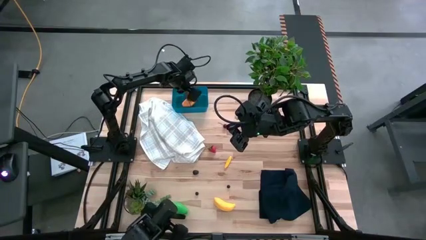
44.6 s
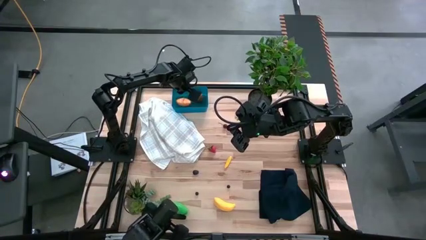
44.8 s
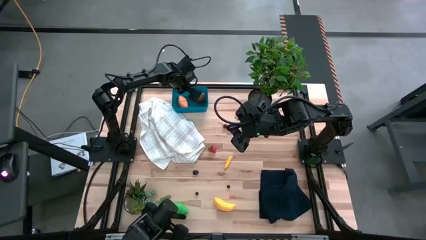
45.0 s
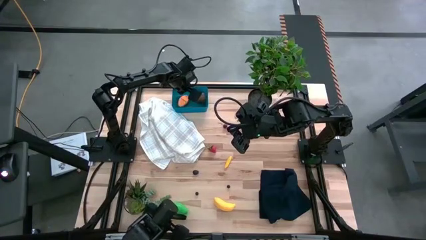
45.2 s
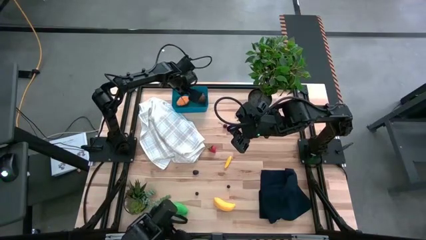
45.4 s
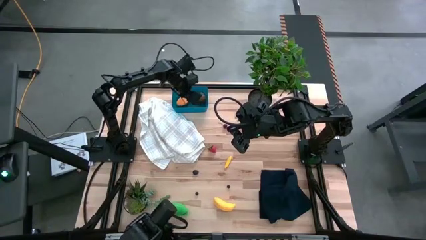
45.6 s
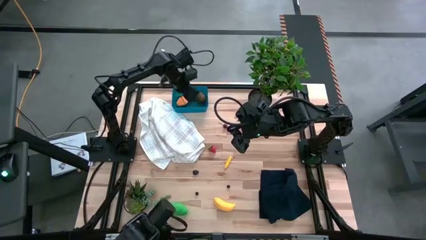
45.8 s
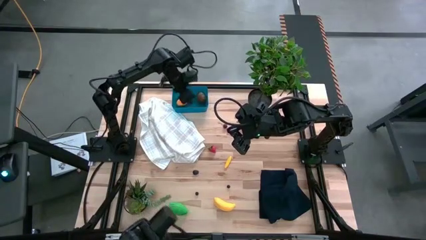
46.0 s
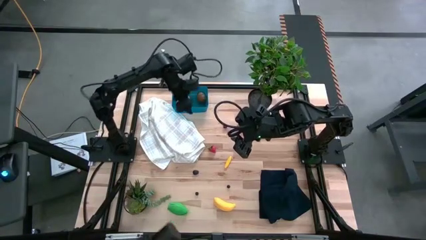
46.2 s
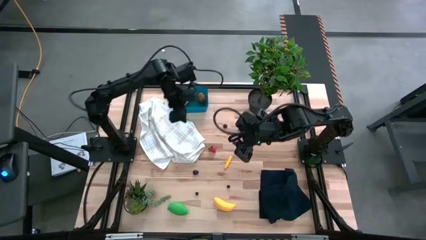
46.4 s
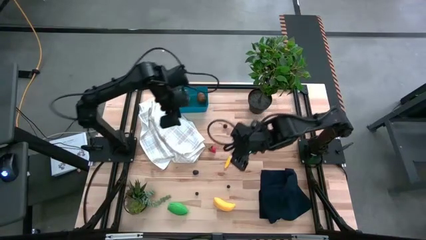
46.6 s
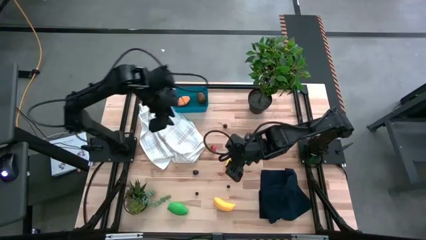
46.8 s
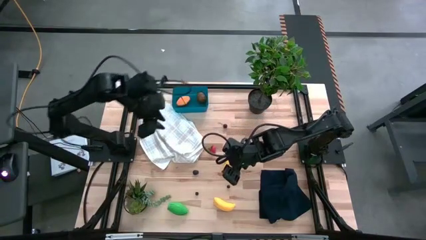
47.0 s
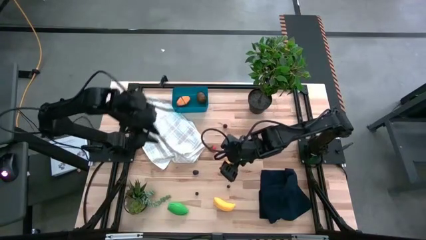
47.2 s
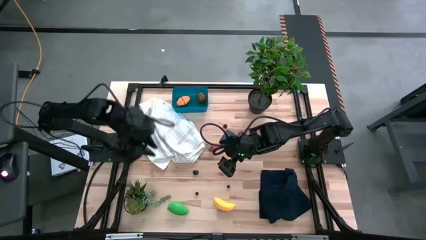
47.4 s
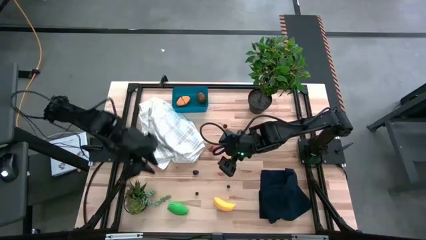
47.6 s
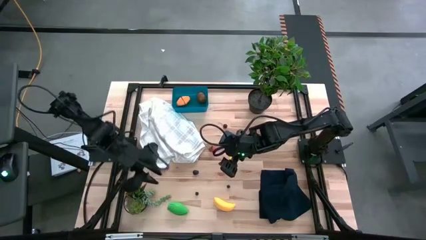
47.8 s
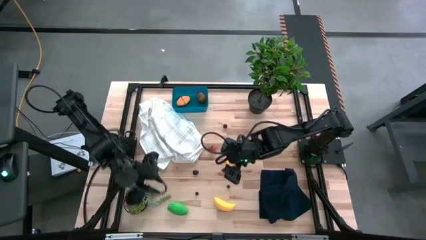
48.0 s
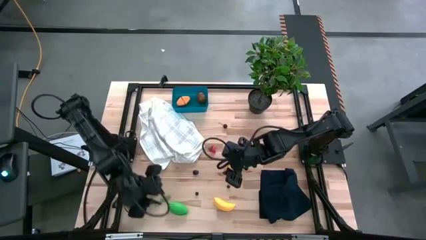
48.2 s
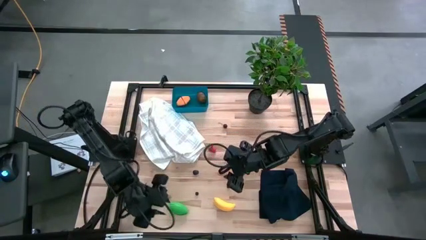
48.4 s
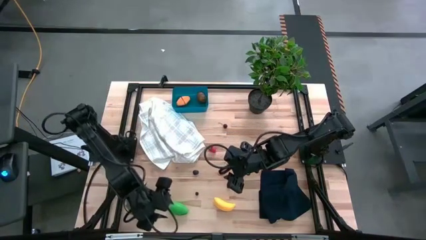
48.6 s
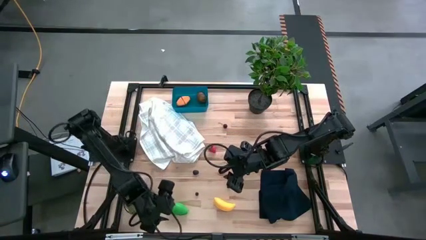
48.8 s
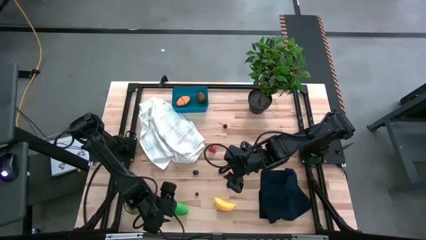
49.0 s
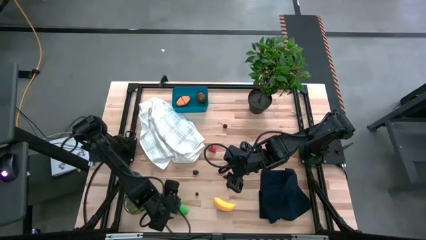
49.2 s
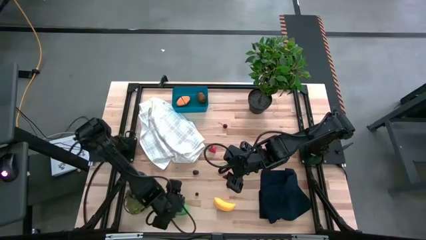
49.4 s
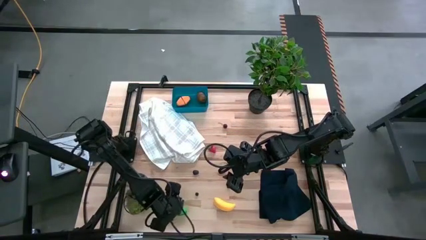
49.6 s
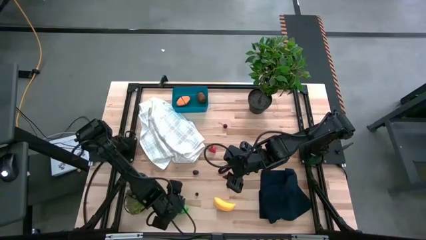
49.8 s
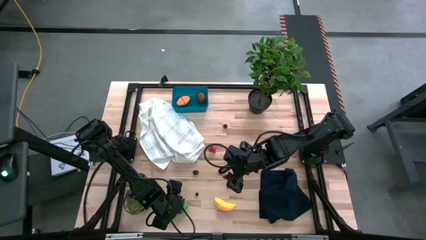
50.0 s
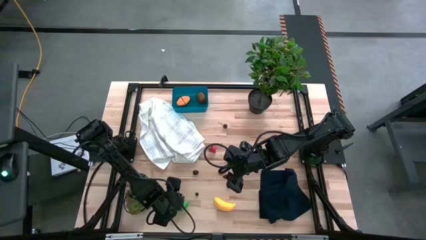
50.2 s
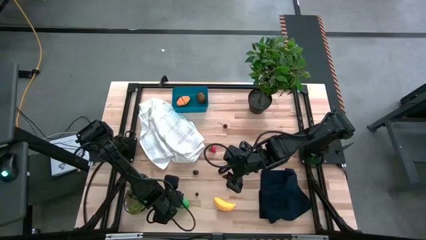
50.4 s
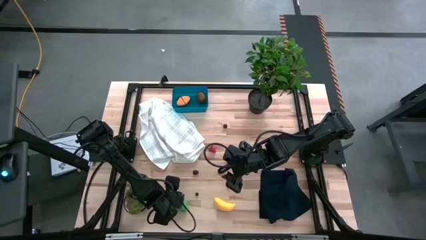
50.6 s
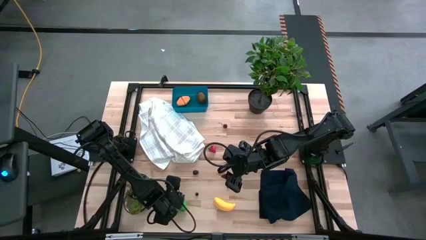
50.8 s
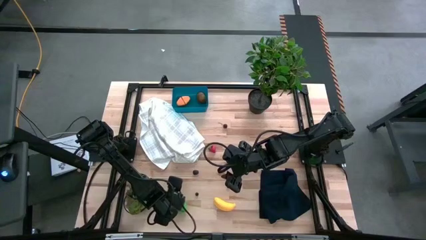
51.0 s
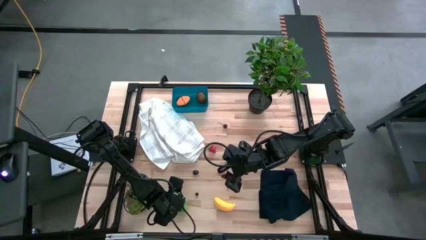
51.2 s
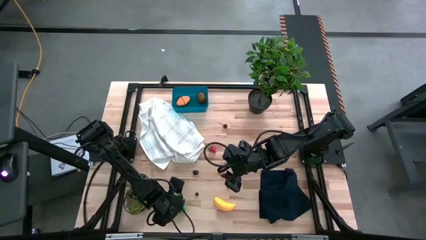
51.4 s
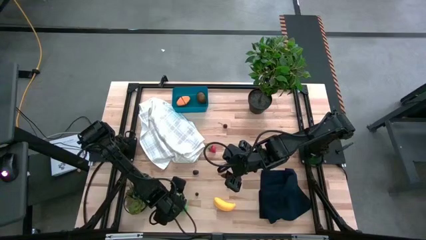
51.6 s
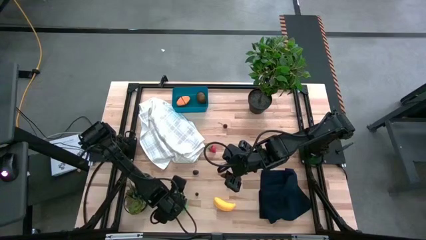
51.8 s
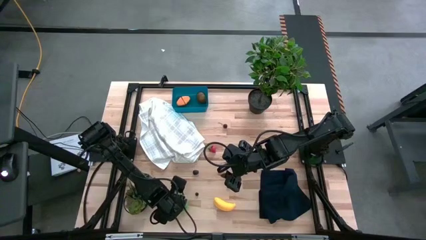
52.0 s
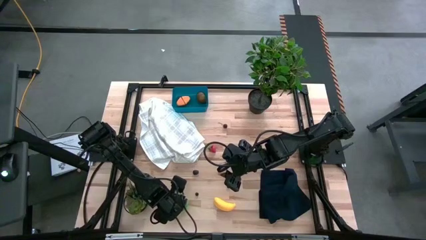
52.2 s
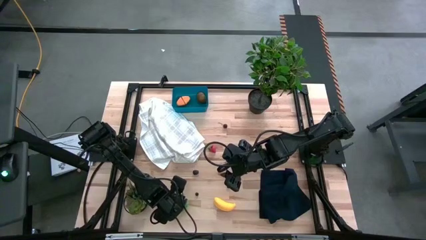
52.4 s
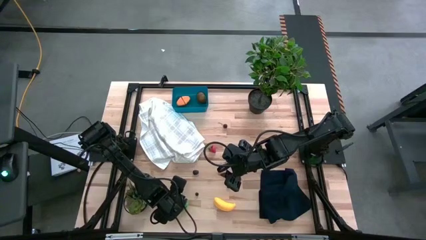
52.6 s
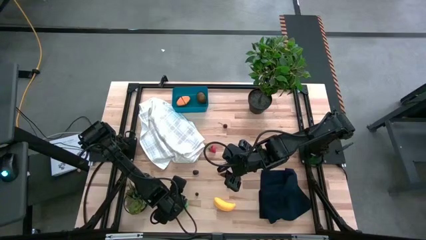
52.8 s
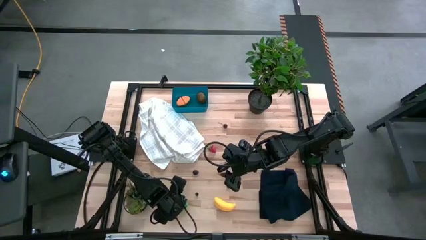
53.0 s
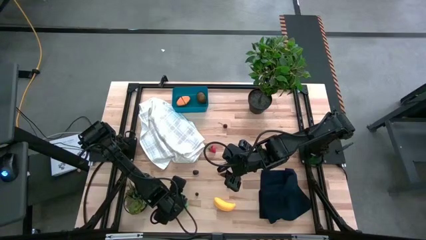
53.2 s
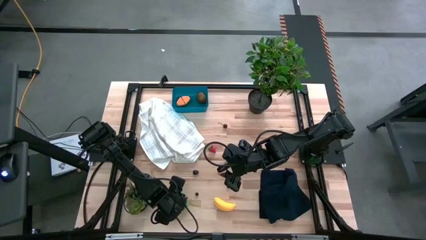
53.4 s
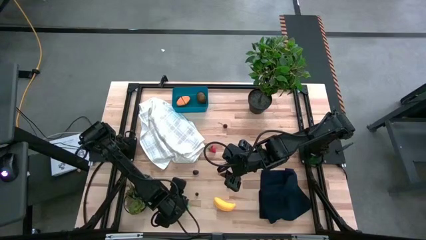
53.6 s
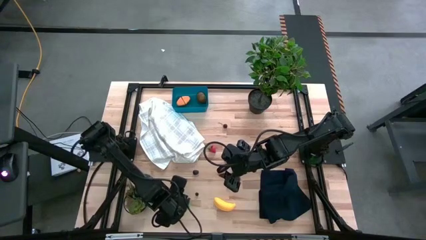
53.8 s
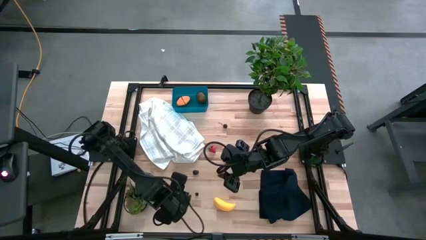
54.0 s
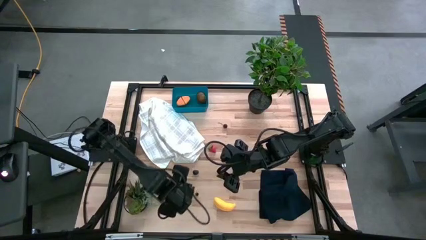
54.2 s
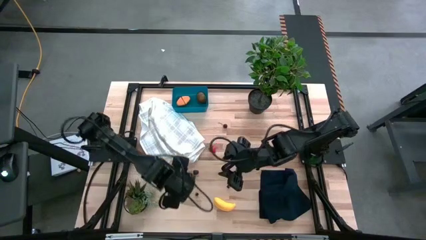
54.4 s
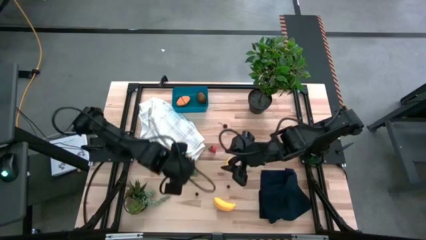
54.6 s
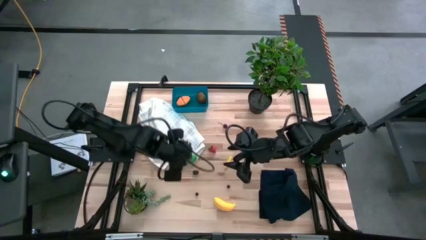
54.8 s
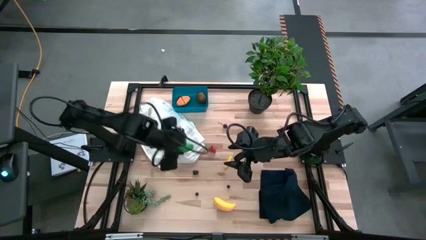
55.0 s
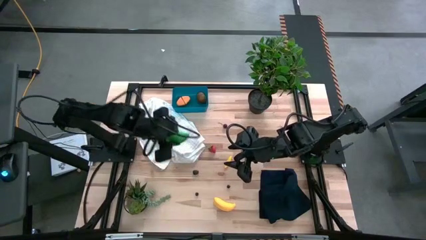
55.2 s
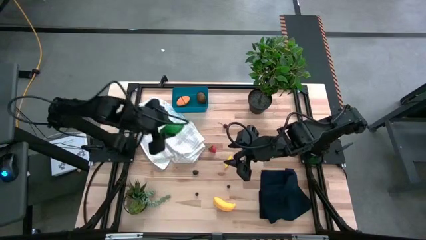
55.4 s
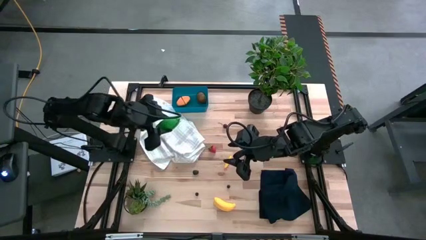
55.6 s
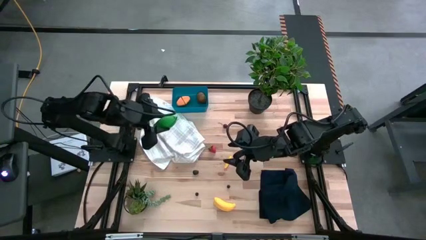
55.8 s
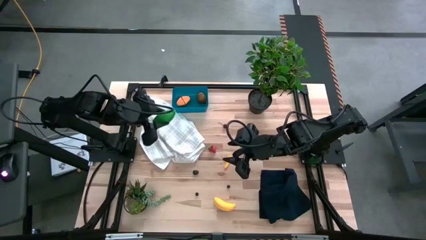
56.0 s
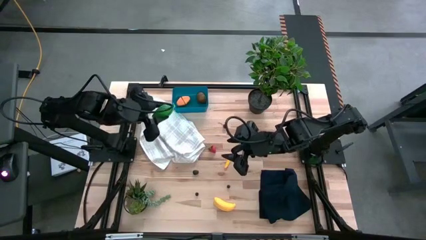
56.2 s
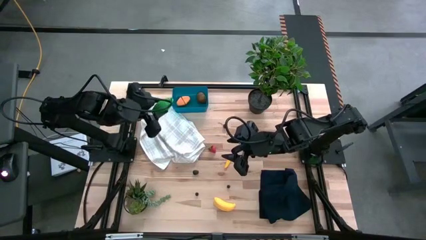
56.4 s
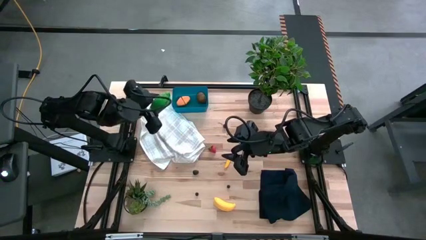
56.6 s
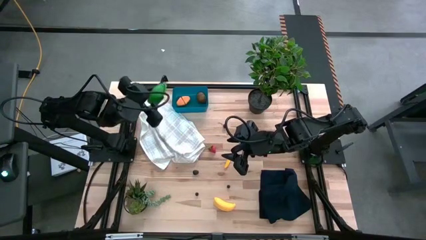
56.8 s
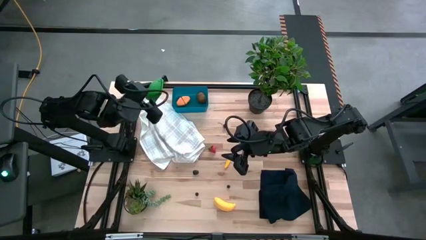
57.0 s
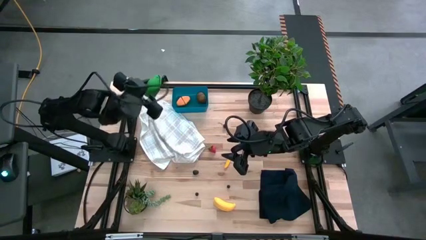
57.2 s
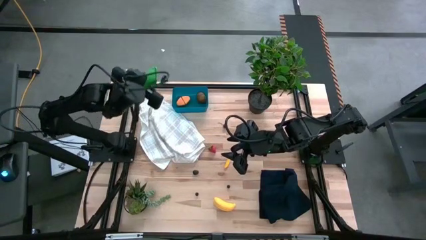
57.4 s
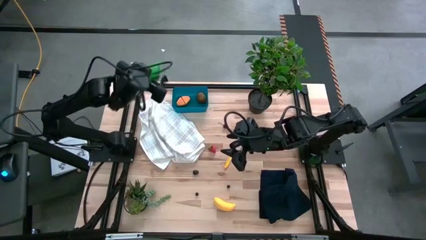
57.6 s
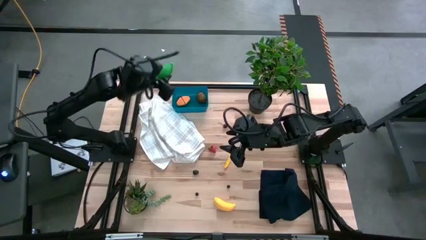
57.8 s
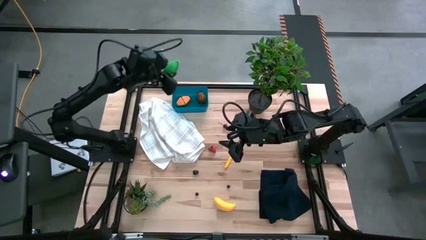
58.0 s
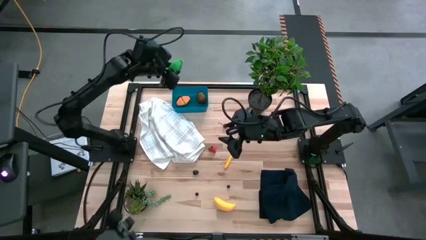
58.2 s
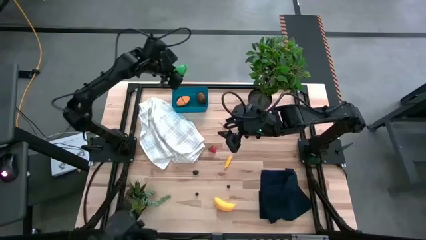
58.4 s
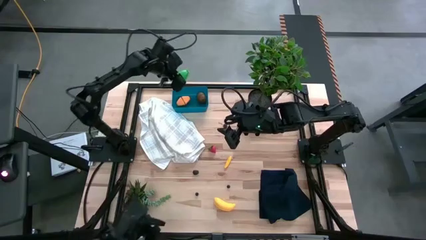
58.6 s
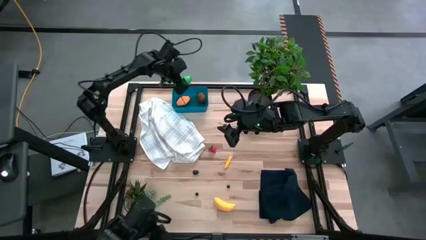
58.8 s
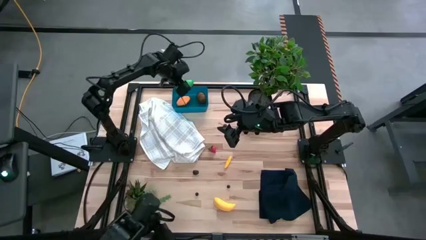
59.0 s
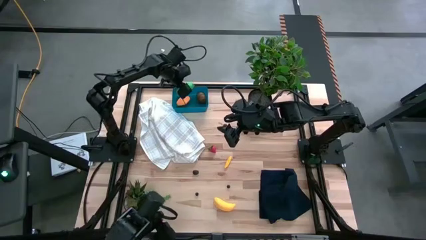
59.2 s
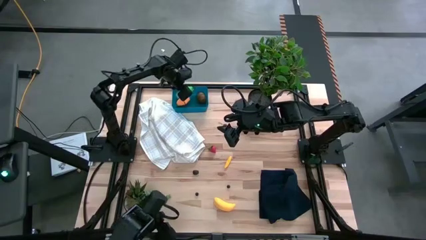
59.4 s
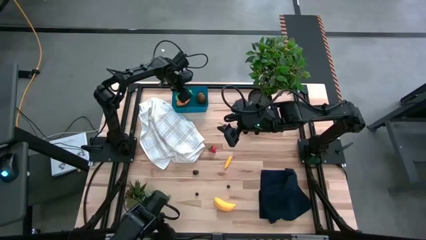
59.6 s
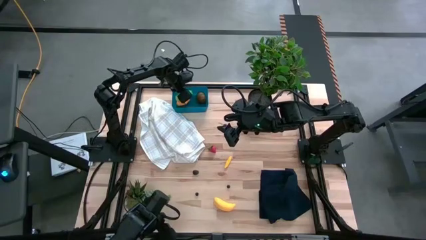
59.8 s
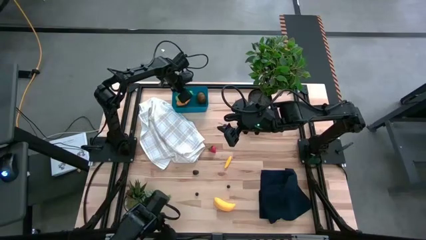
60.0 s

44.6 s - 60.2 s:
Task: Pick and placing Produce into tupperware
Put the green corn into the blue bin
